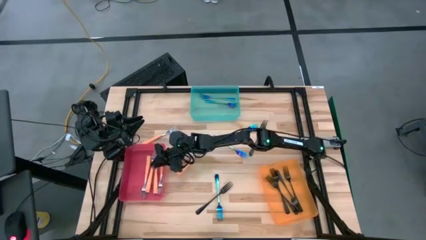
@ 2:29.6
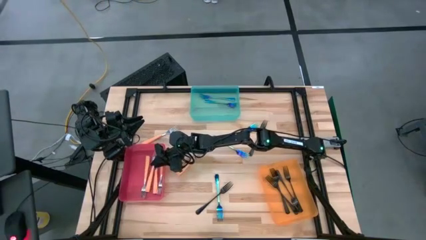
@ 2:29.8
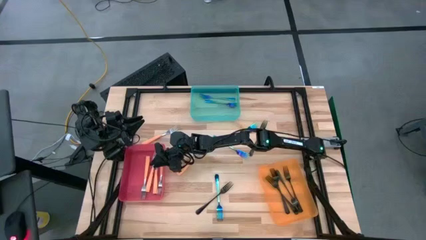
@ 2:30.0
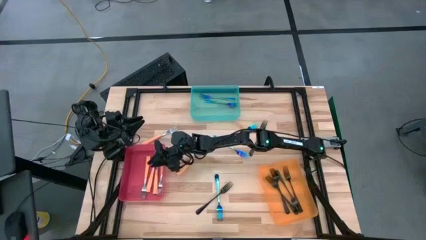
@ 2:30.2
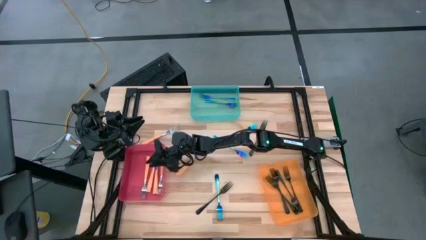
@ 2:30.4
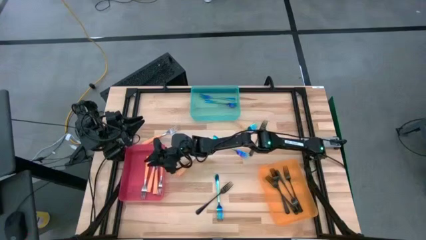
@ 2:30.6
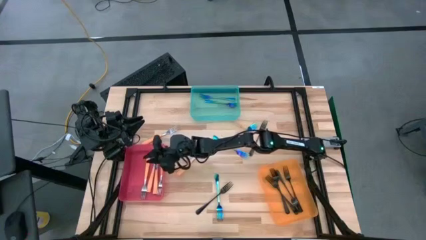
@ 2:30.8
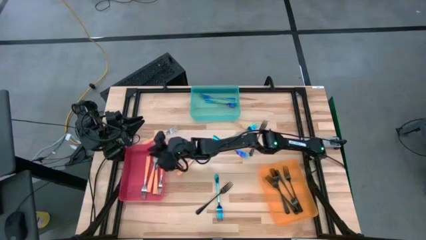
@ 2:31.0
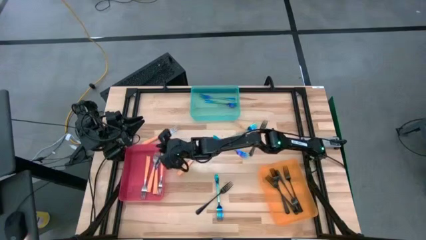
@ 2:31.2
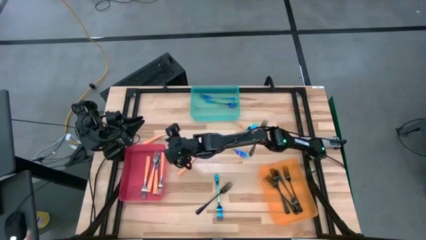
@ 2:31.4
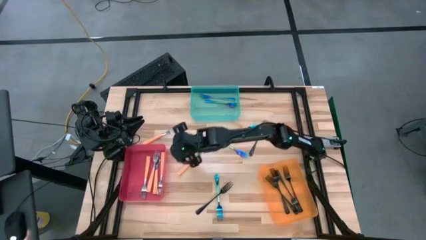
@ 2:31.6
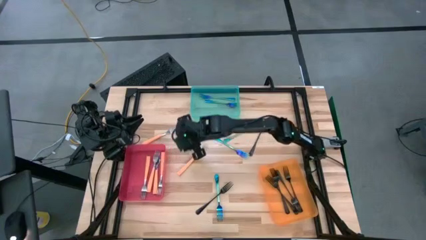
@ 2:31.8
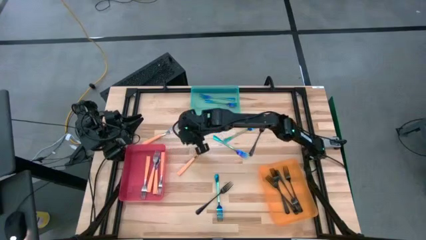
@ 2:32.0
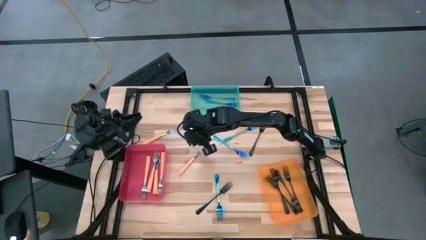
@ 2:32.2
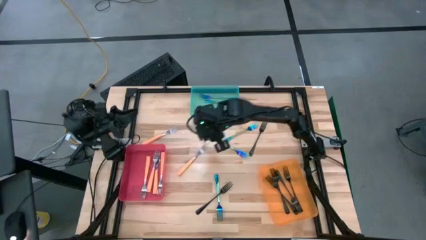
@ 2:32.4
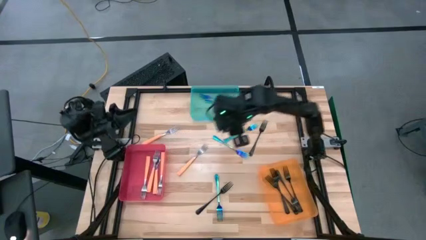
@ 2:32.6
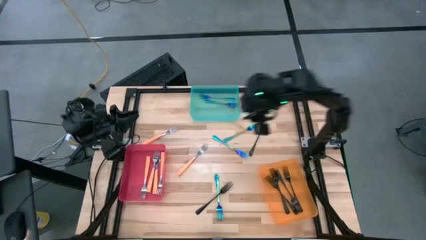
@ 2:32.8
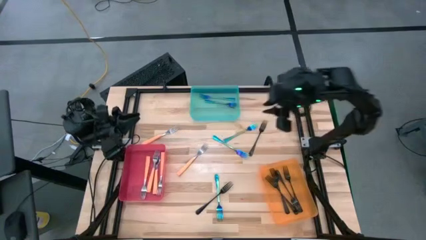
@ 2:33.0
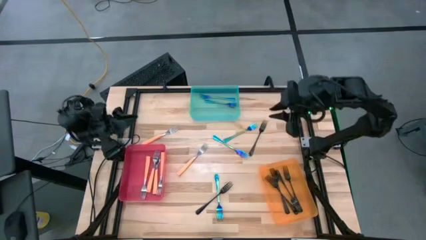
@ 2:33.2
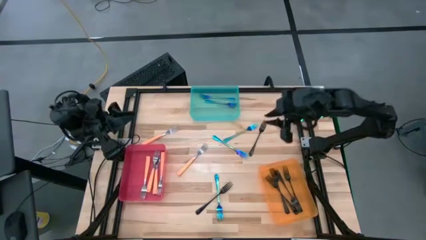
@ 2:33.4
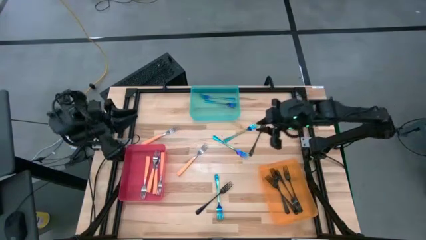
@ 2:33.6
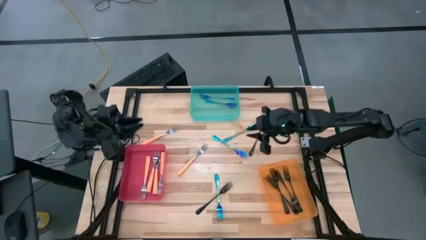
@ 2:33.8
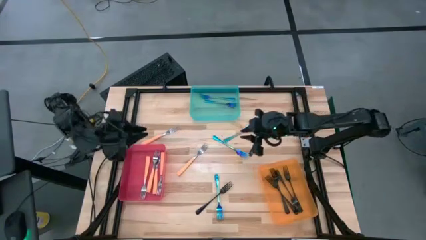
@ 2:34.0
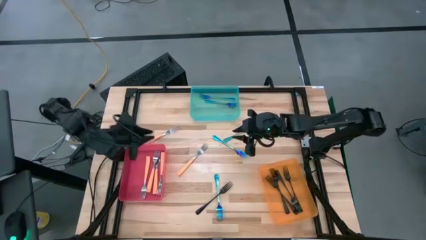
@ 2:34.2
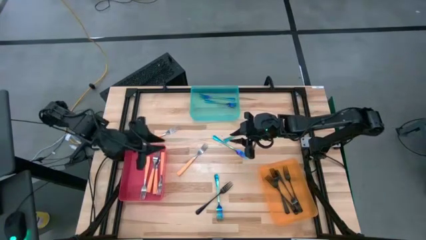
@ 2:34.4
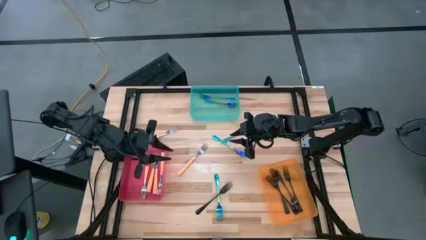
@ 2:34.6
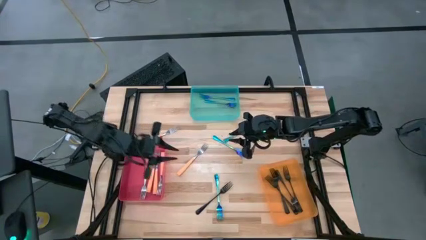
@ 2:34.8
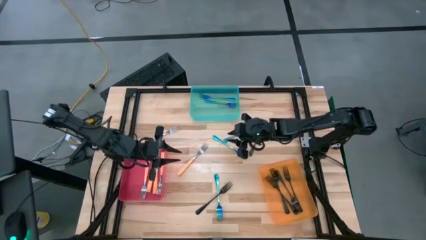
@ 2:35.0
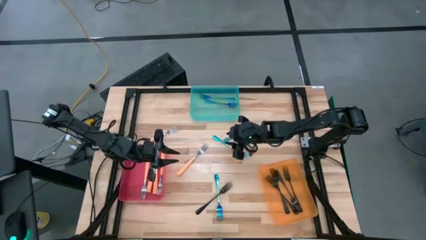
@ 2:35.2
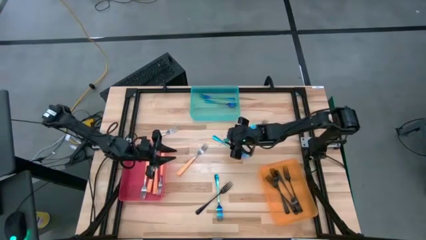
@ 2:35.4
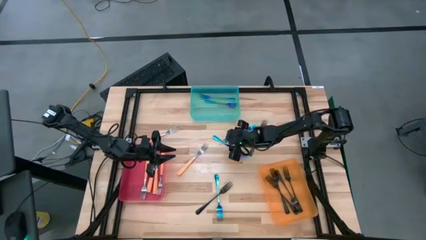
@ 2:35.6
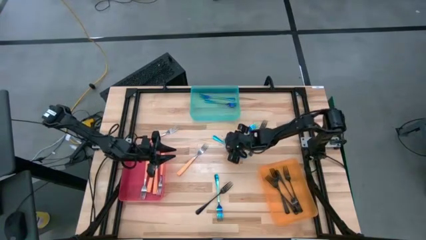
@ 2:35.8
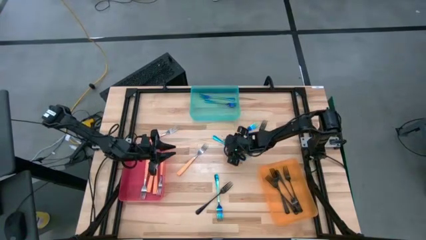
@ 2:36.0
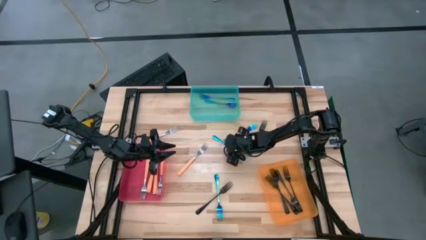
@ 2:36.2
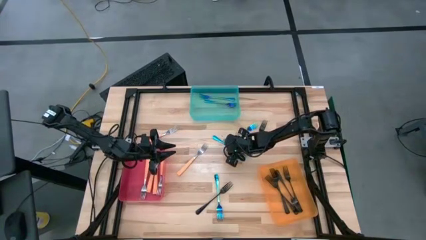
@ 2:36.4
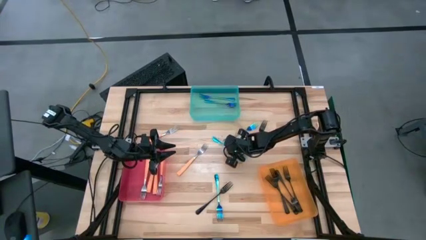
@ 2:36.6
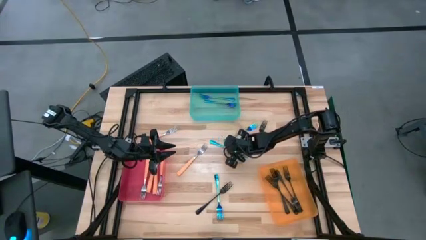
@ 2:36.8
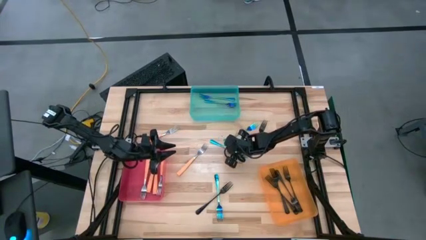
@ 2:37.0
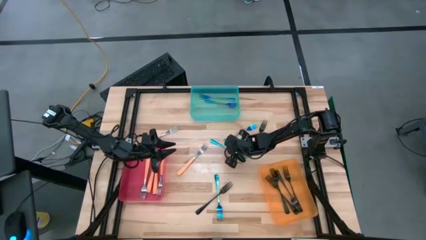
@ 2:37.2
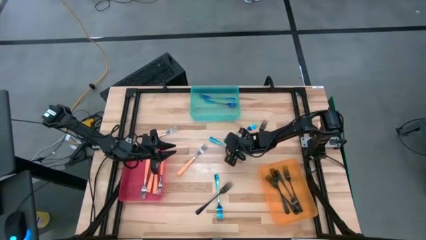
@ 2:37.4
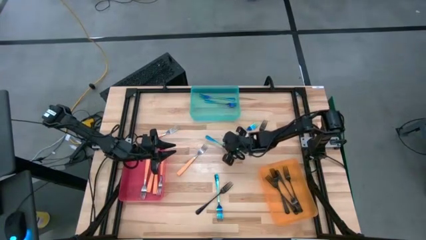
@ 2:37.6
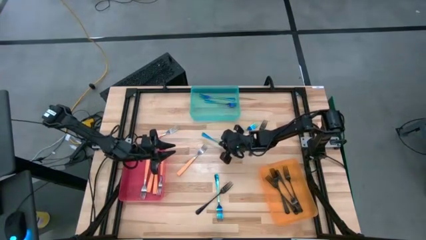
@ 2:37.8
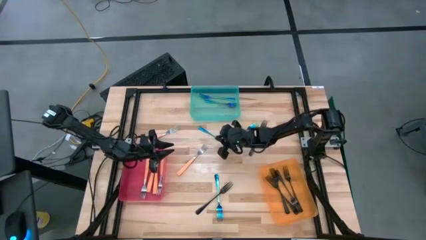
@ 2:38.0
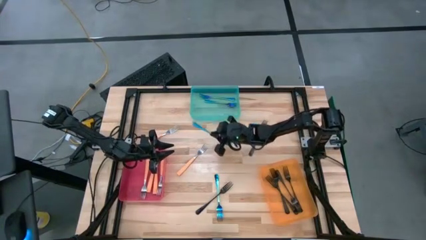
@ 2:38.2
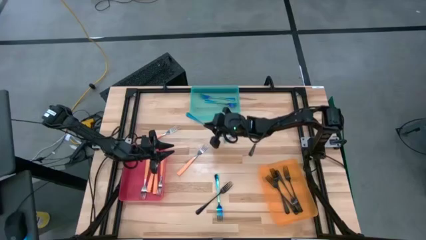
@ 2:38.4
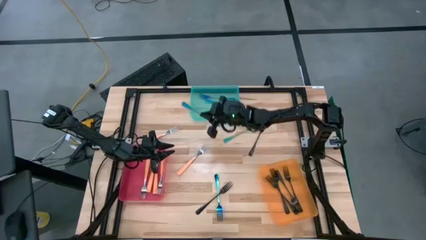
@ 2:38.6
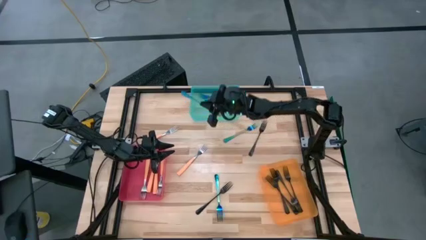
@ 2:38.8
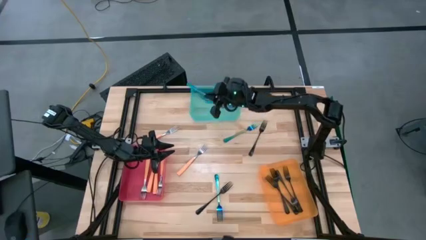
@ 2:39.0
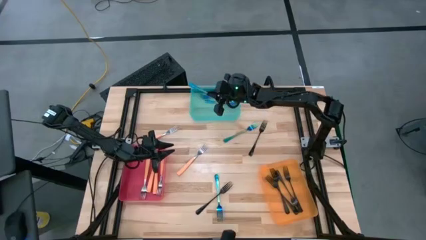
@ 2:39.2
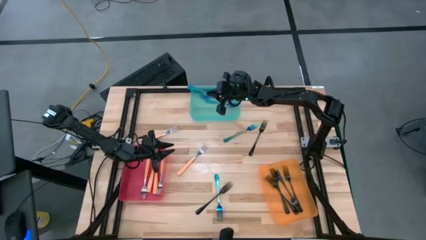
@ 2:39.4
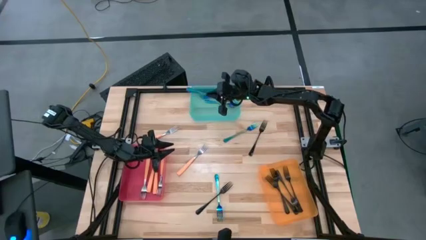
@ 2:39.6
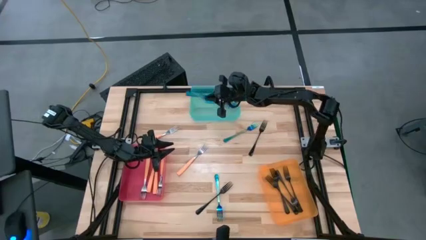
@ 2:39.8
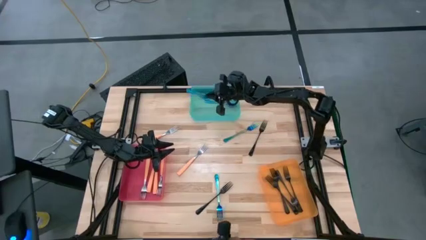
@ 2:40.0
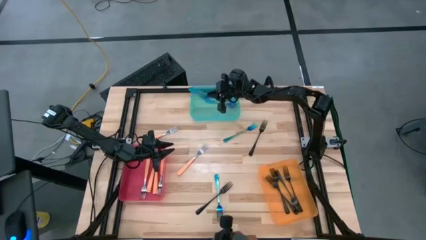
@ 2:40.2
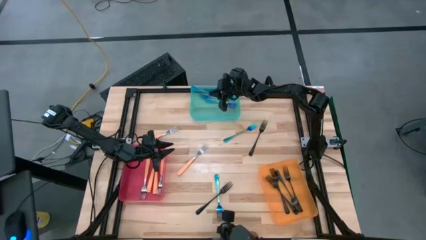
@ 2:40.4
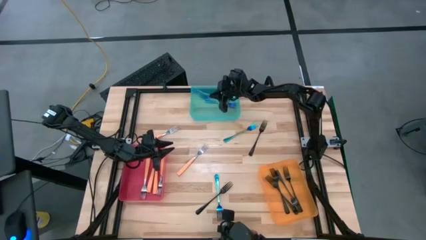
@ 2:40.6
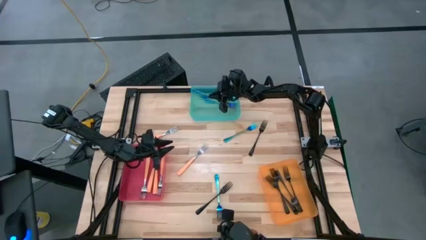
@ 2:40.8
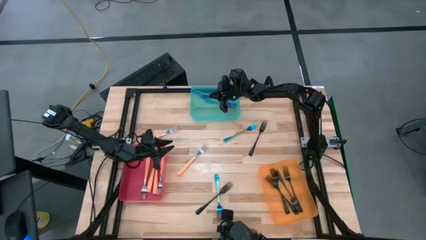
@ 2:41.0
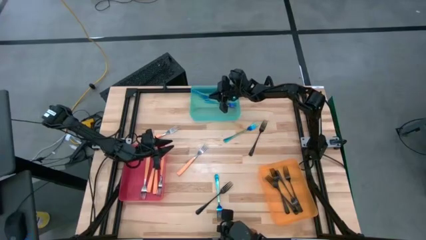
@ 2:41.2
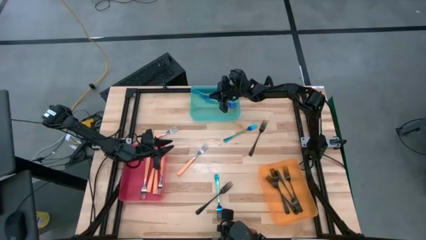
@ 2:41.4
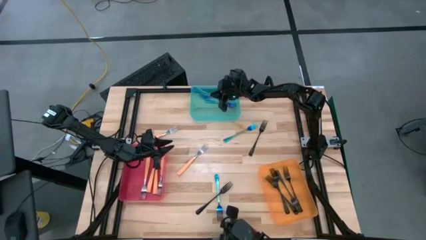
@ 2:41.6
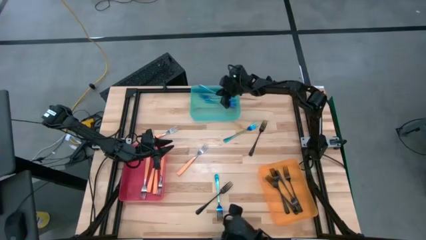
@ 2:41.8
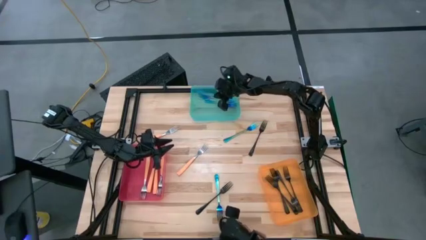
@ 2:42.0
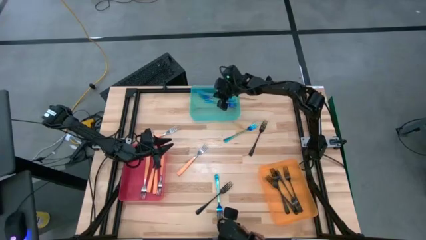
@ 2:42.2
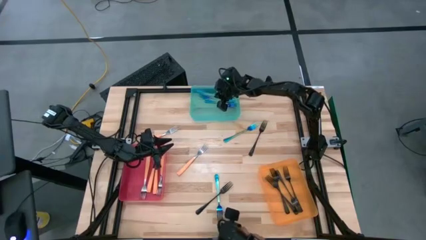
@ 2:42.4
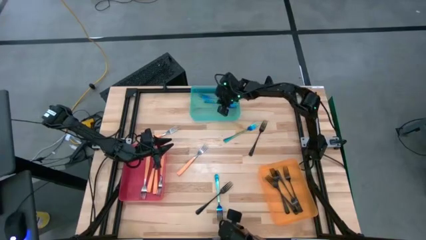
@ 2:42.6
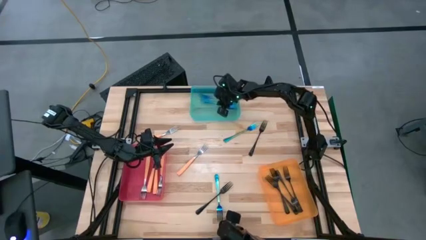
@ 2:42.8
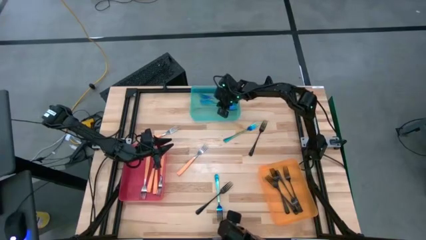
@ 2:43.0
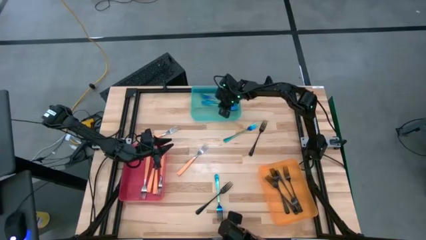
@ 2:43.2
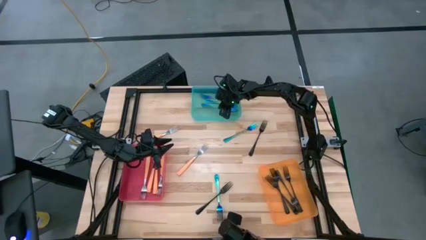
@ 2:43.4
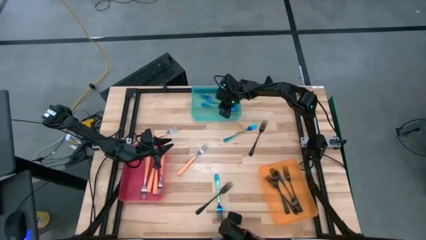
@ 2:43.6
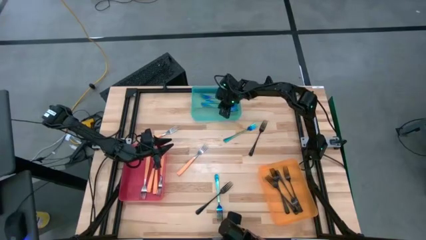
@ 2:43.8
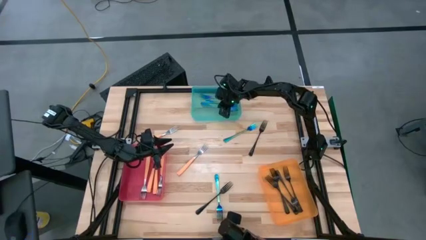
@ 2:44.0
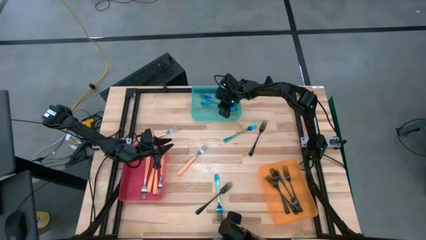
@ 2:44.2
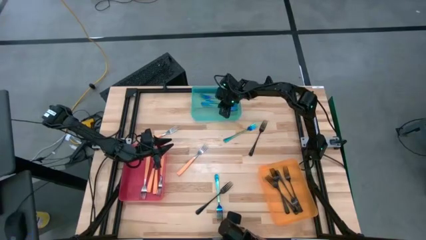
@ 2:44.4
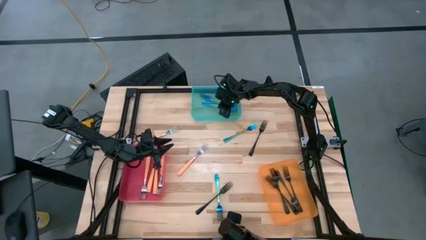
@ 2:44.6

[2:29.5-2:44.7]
Task: Sort silverware by color (type)
Put the blue fork into the blue bin

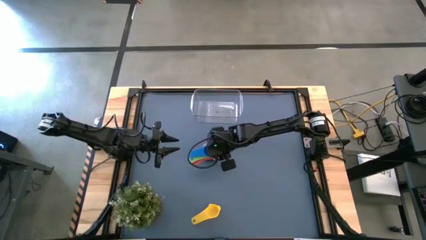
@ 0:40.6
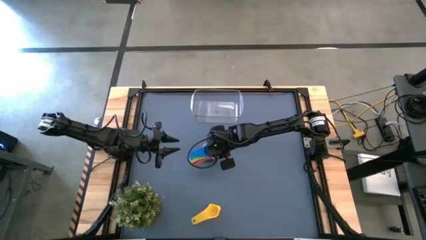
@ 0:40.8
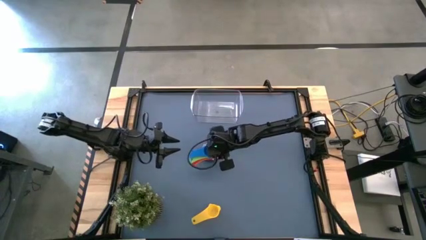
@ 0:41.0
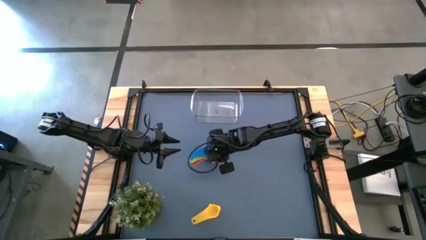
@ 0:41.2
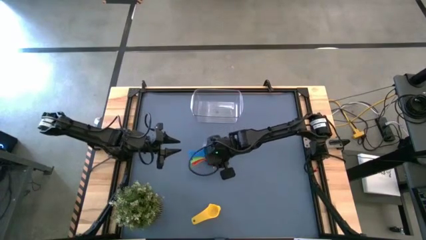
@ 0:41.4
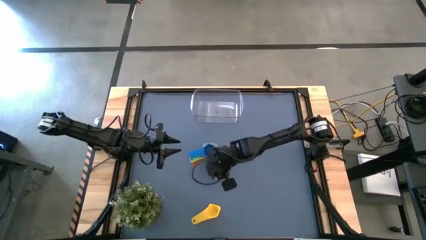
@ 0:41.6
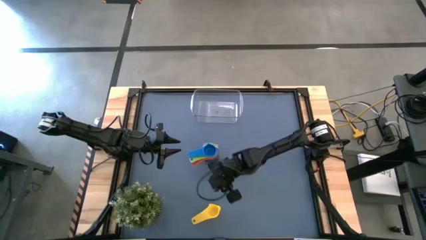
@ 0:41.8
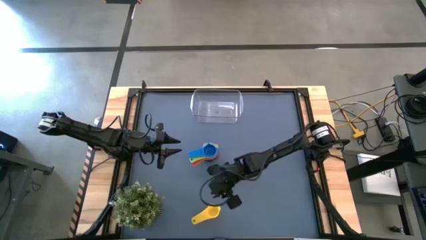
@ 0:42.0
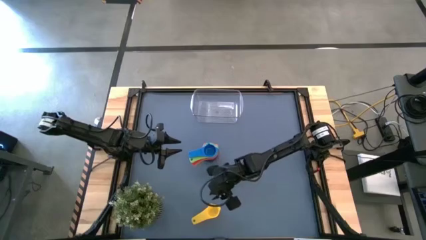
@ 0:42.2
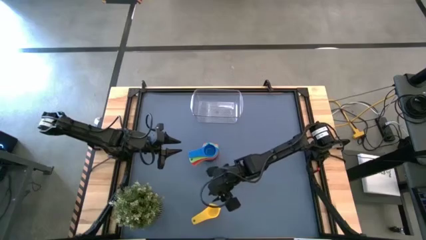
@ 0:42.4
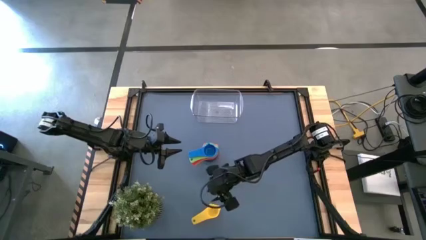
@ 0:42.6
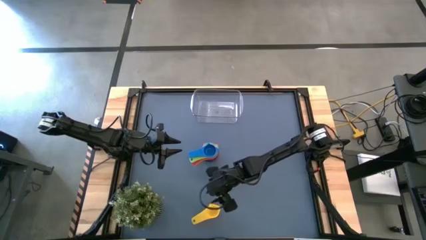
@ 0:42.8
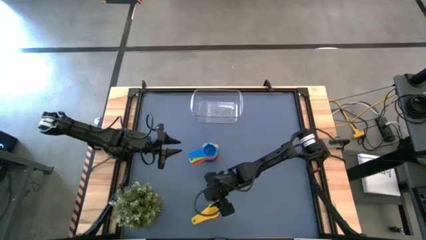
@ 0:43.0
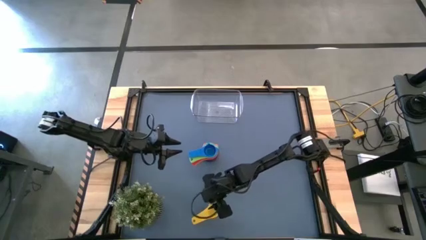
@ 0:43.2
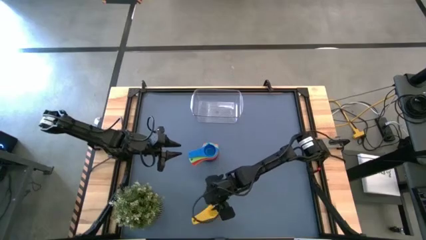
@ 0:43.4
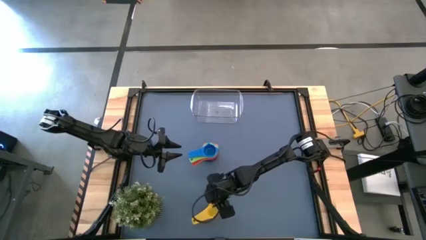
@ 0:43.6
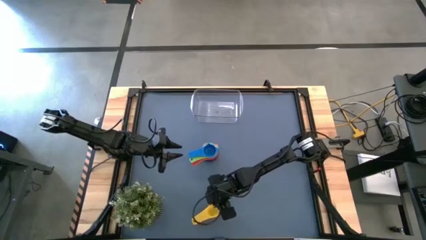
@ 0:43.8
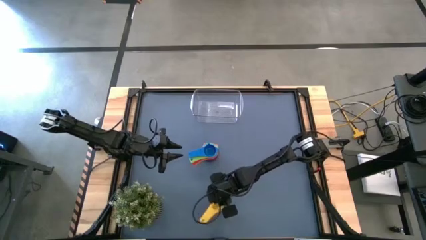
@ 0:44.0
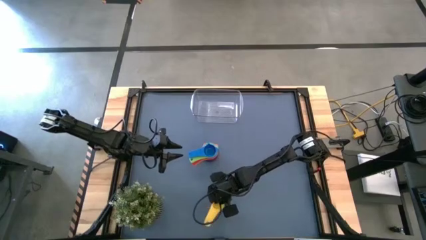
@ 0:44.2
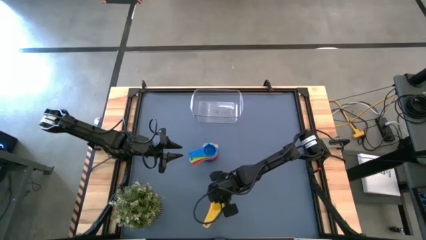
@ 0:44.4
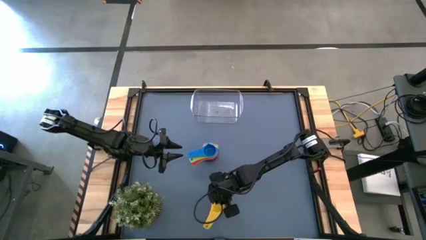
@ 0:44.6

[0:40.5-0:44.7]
Task: Nest measuring cups in basket
Stack the yellow measuring cup on top of the blue measuring cup
